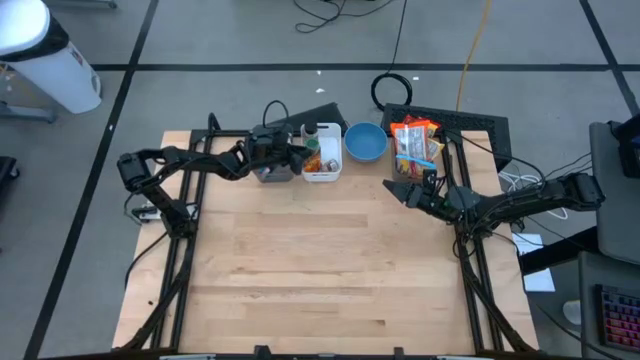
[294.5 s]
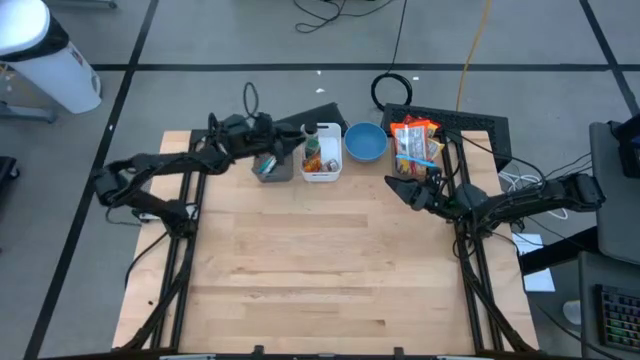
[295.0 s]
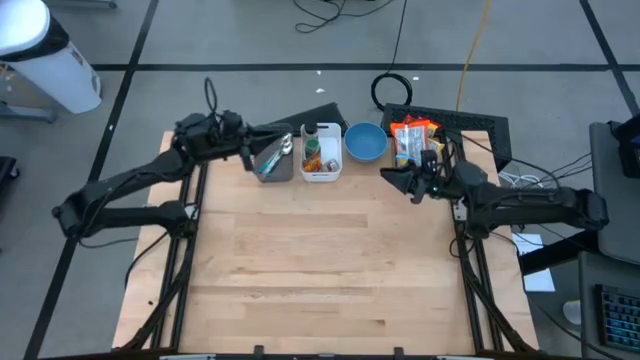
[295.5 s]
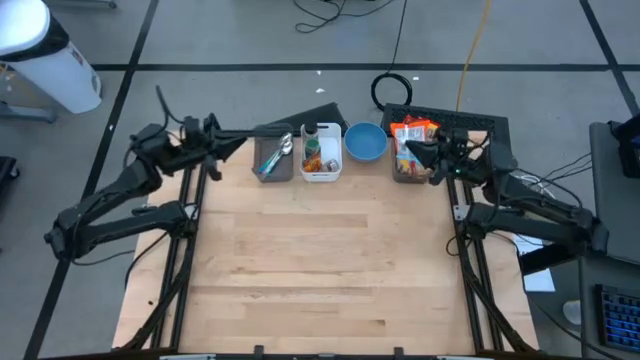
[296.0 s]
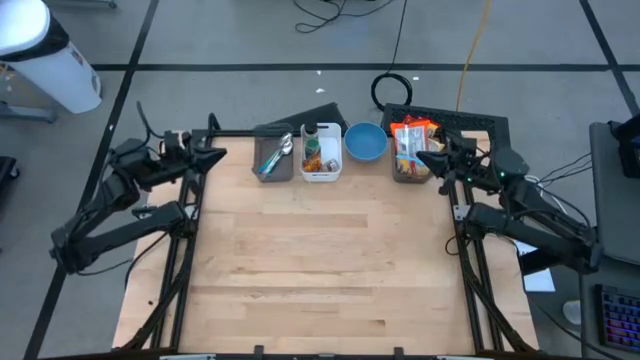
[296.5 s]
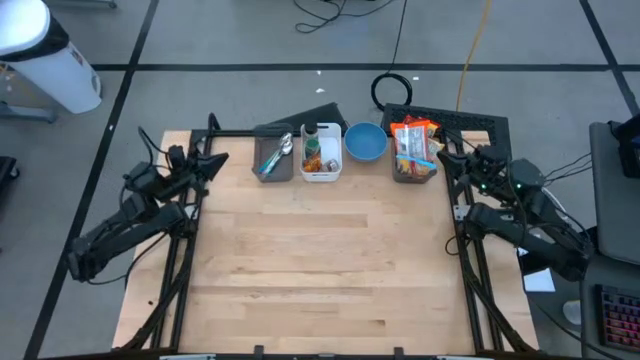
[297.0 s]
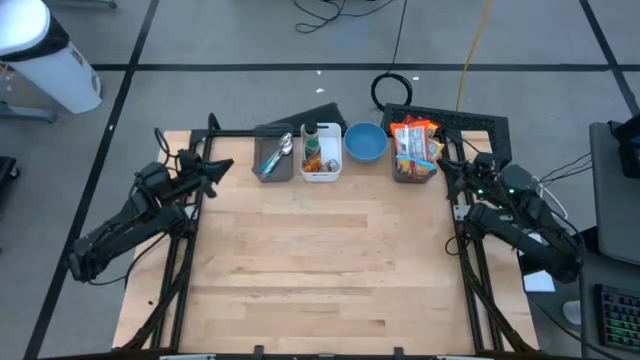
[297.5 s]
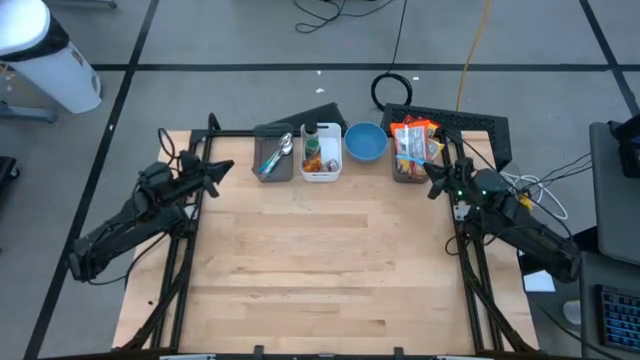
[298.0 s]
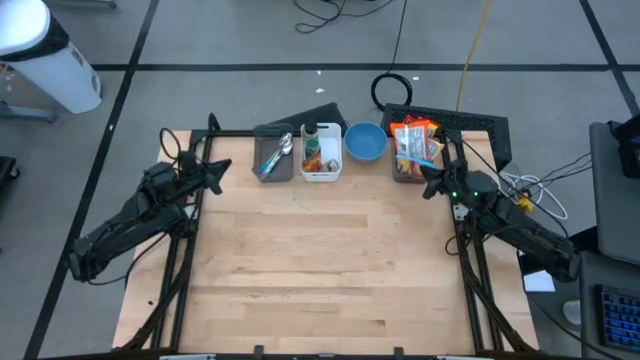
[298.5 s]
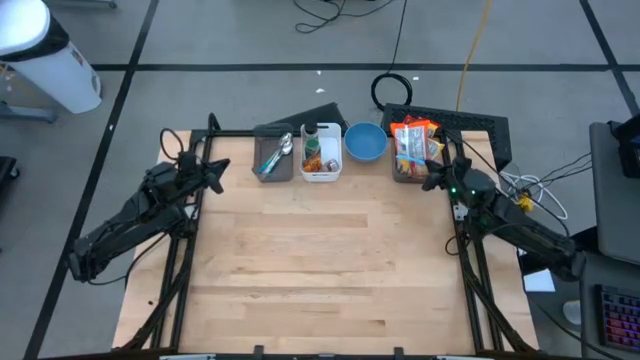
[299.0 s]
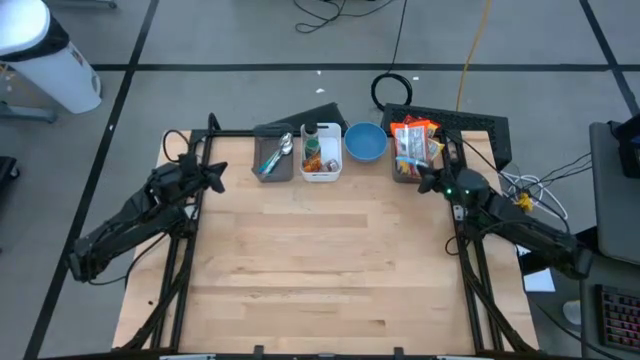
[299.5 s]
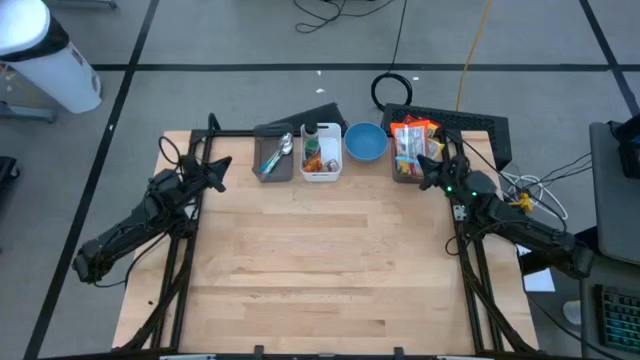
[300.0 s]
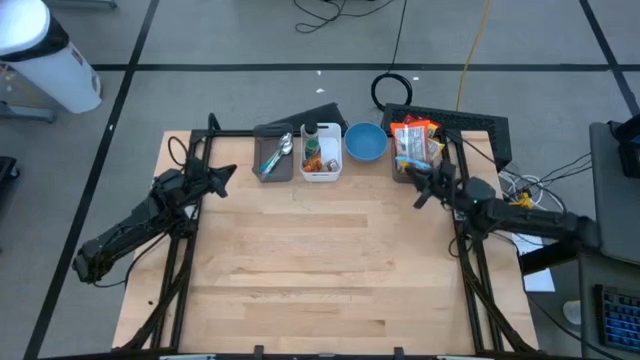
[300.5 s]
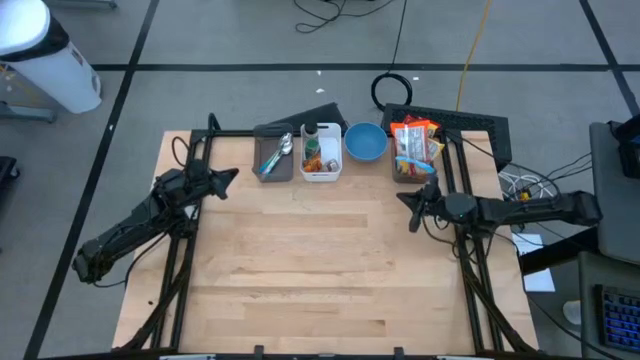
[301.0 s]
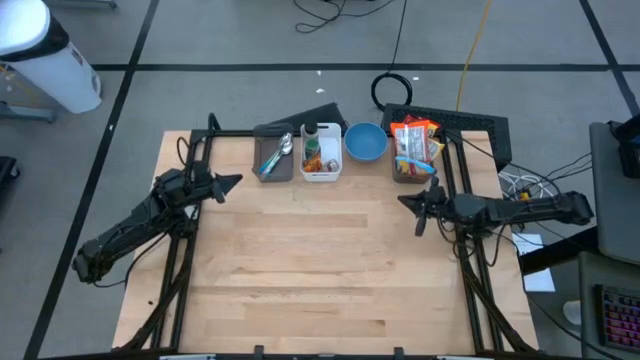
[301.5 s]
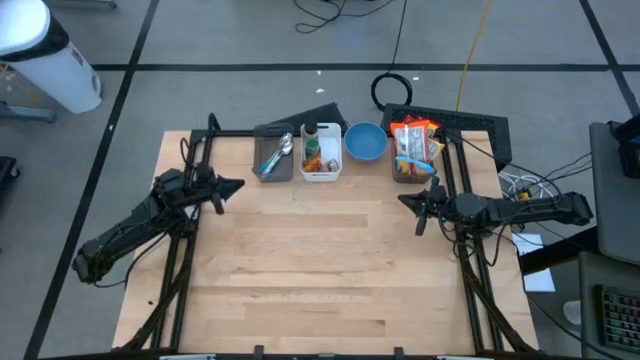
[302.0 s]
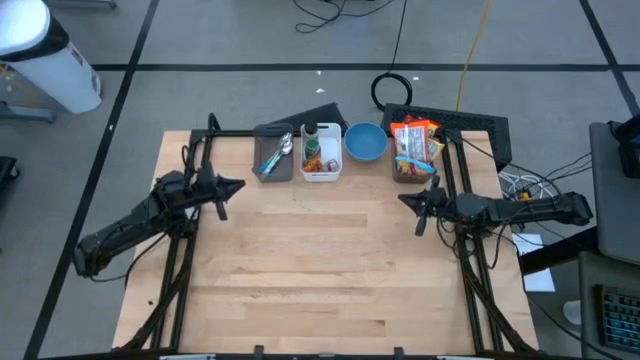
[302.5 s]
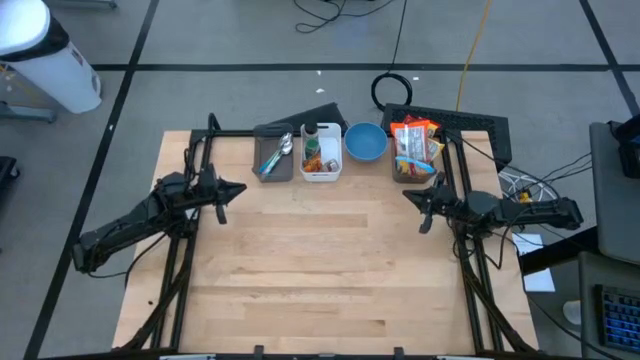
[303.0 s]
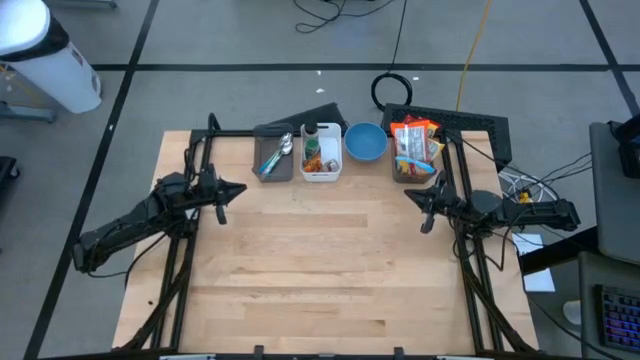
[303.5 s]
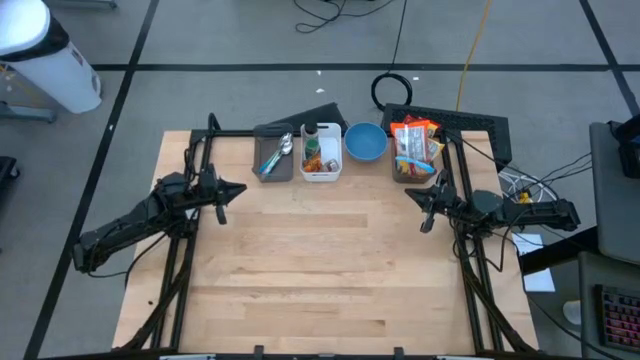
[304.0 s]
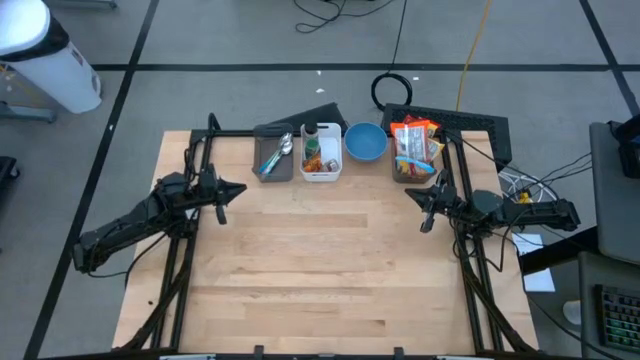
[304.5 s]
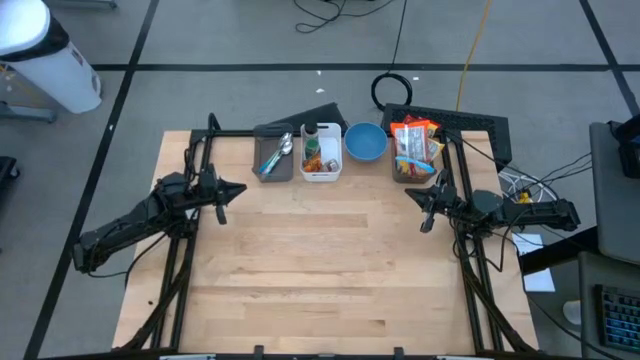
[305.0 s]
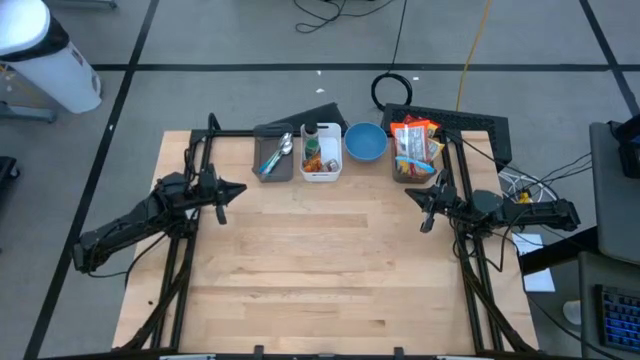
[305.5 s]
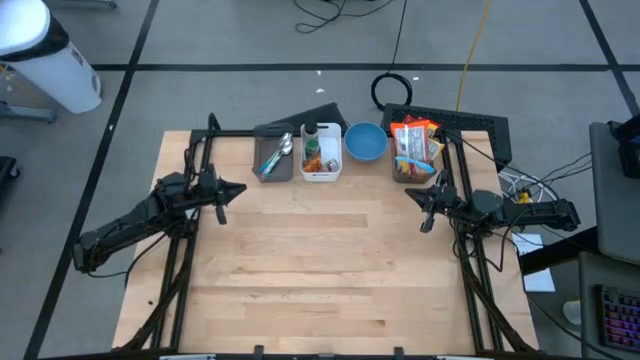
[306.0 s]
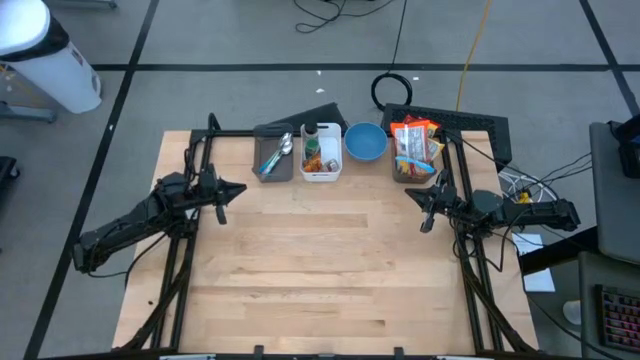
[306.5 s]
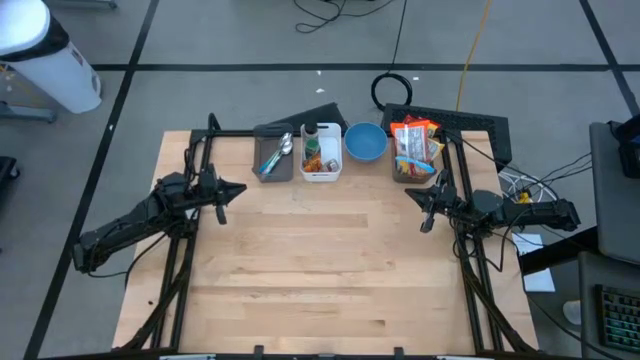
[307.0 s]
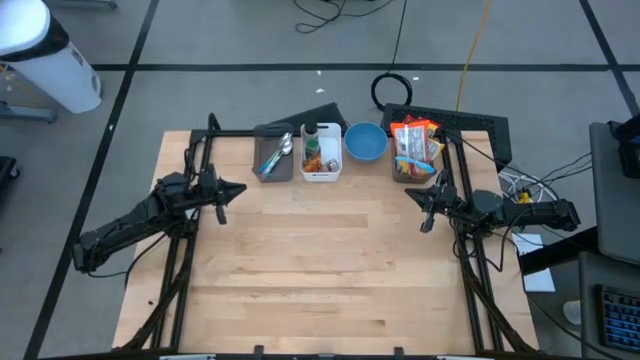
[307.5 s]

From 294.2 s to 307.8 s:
Task: Pick & Place Food Item
Return to Home Position

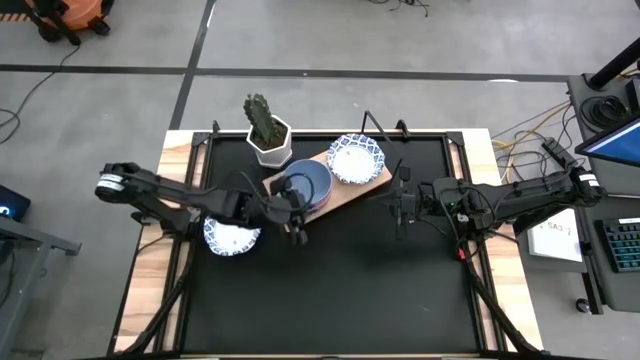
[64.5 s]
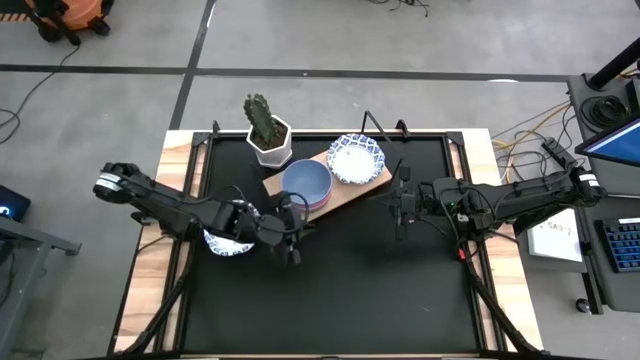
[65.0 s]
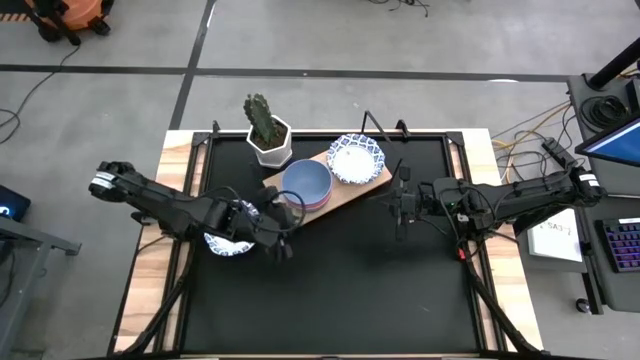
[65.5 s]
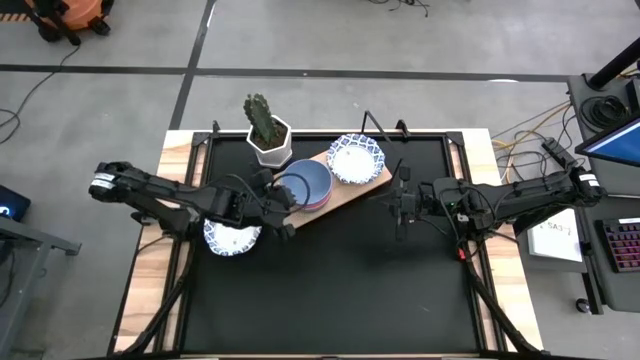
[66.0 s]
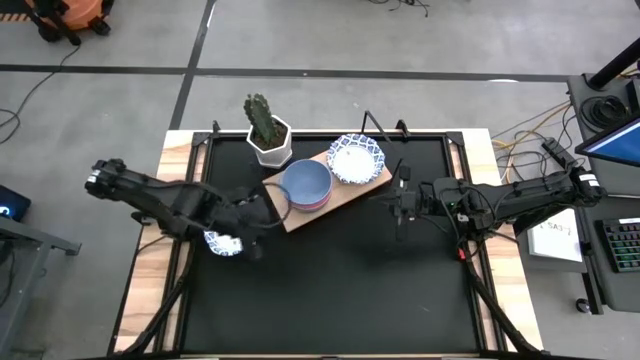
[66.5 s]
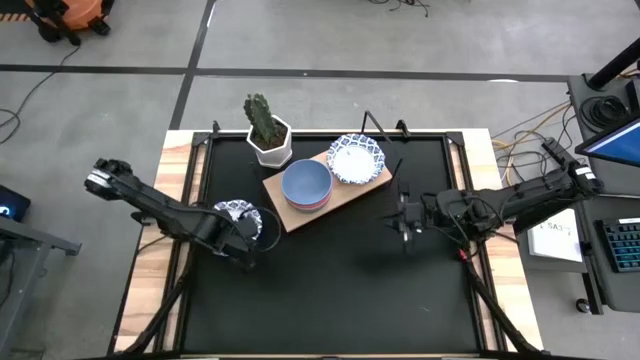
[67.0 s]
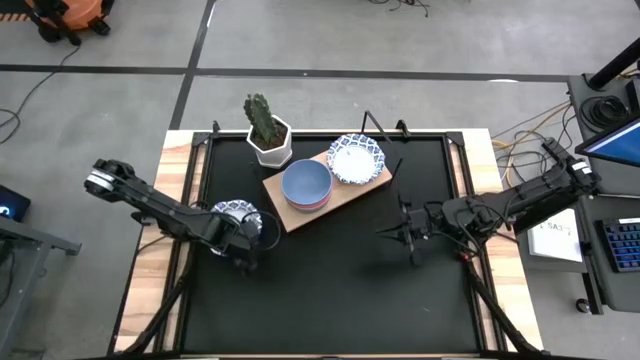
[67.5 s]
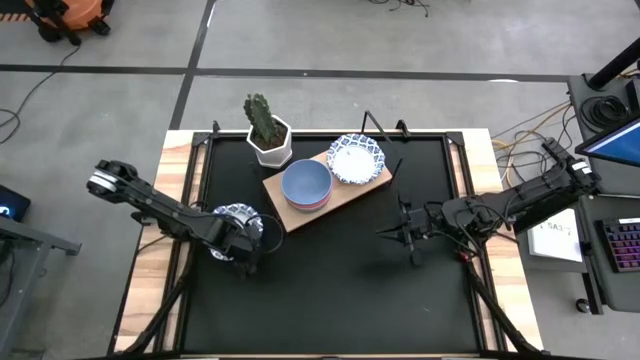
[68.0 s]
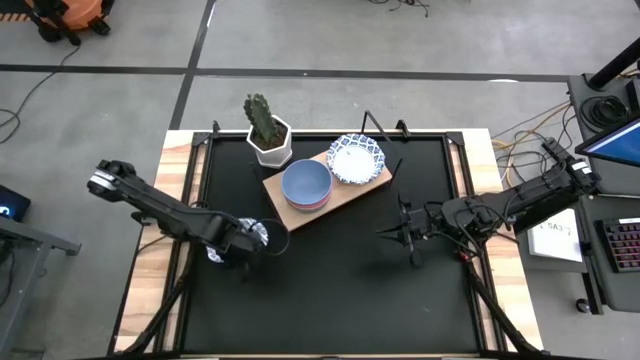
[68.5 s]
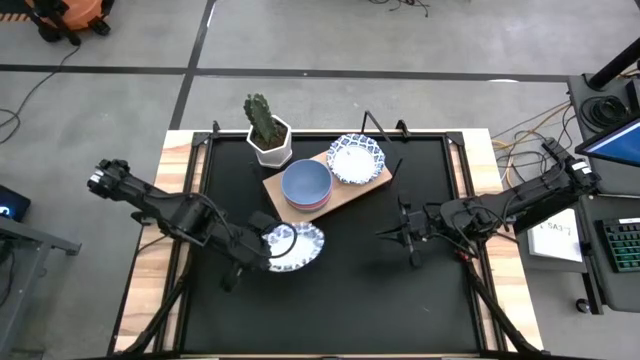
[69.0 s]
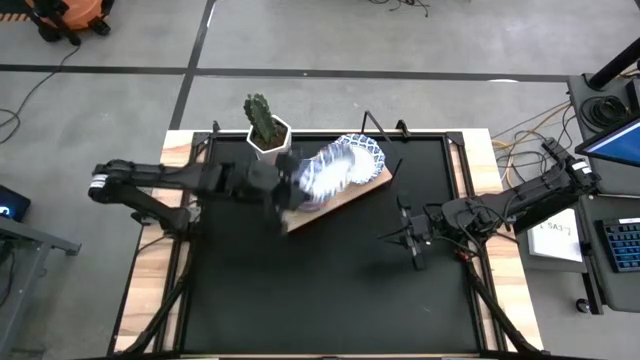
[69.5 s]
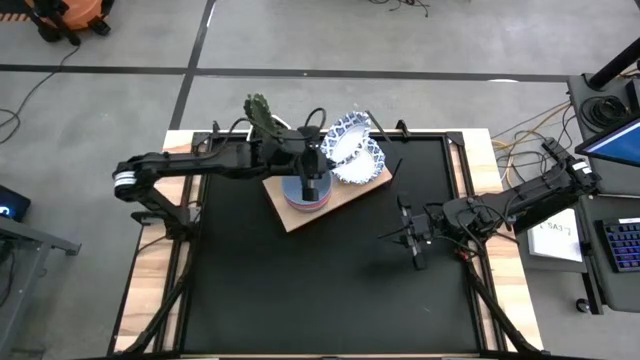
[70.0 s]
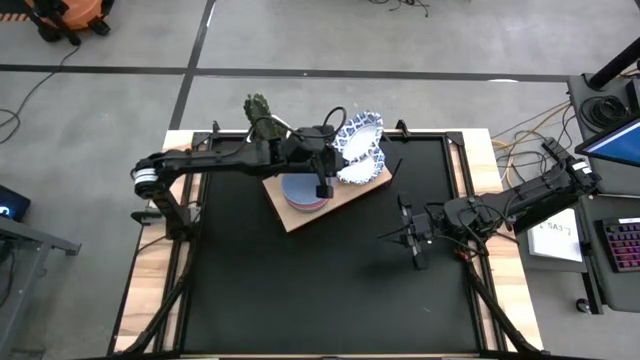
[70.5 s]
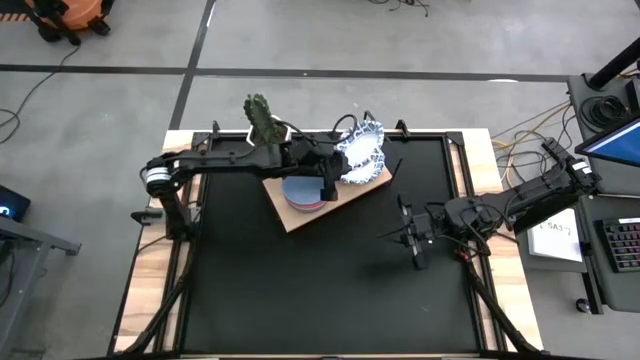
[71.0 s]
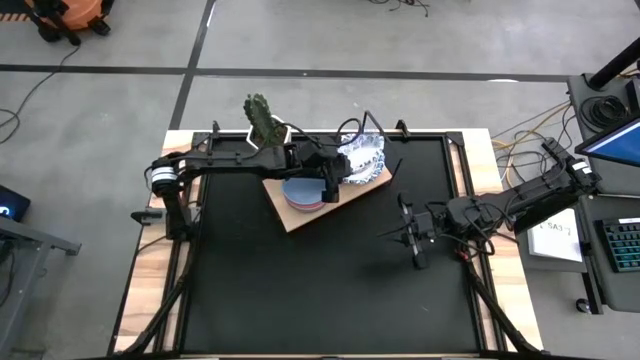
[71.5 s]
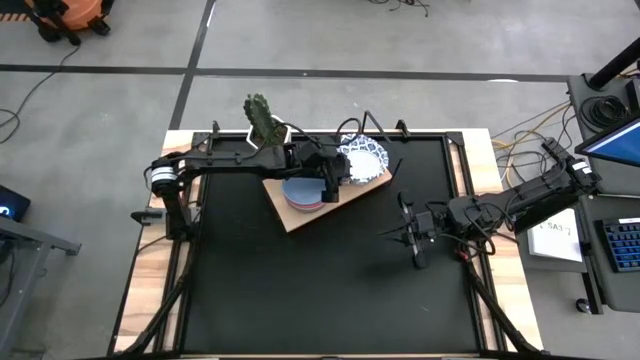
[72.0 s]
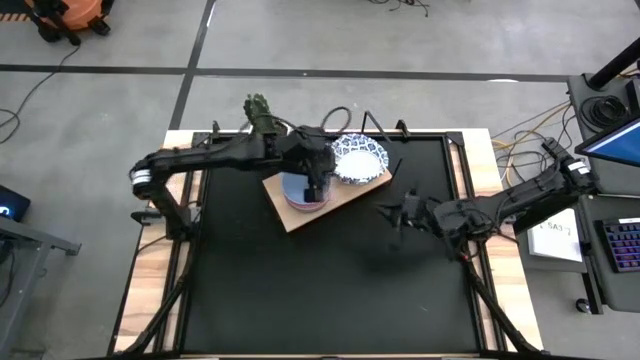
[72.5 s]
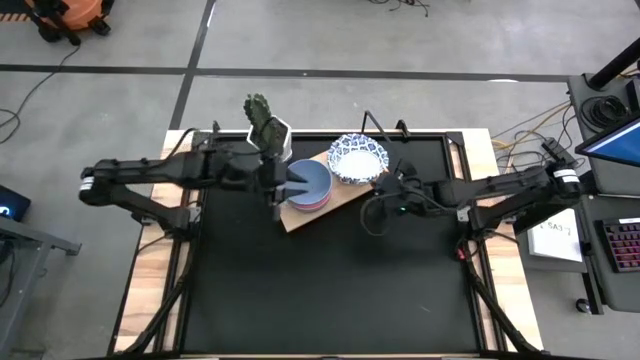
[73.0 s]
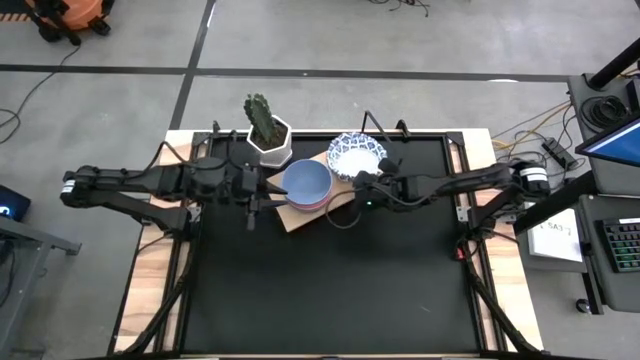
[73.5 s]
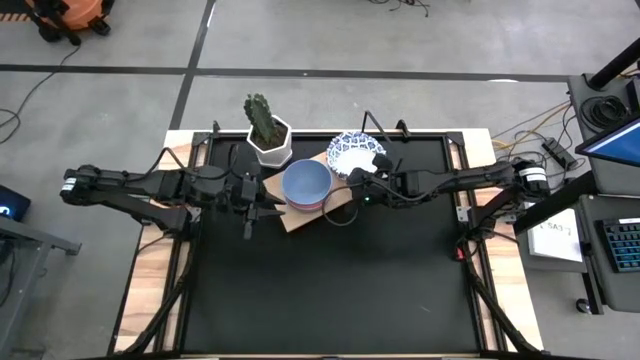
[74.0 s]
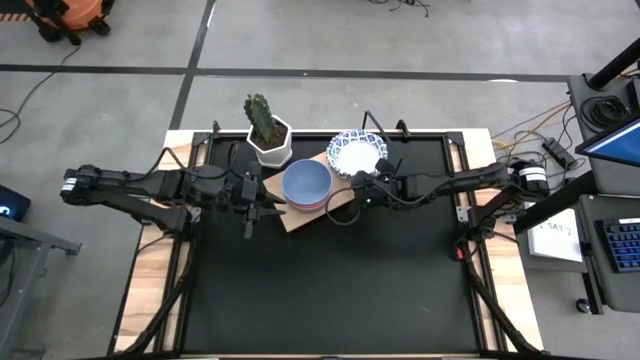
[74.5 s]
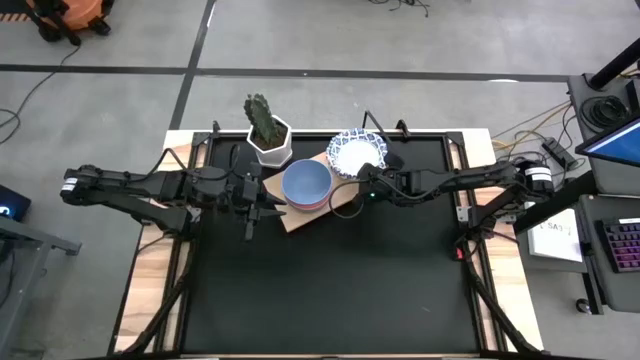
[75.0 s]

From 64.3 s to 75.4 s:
Task: Place and stack bowls onto a shelf
Stack the white bowl on top of the white bowl on the shelf
